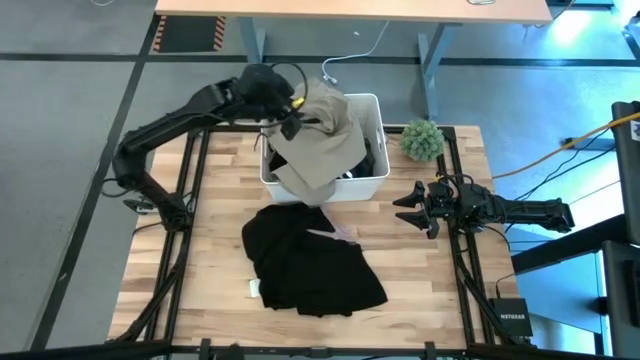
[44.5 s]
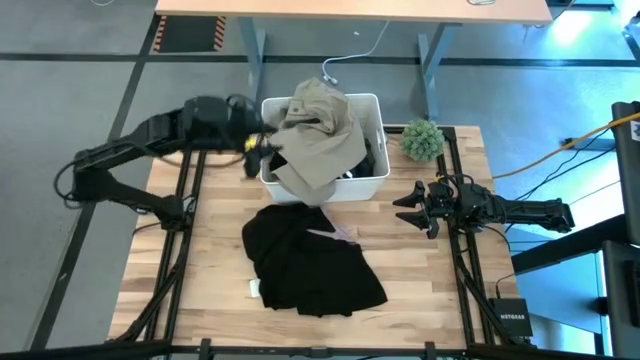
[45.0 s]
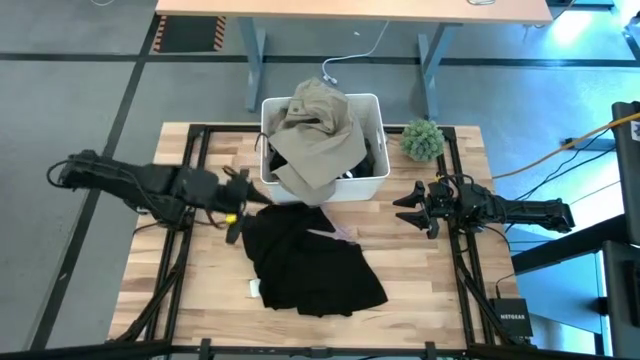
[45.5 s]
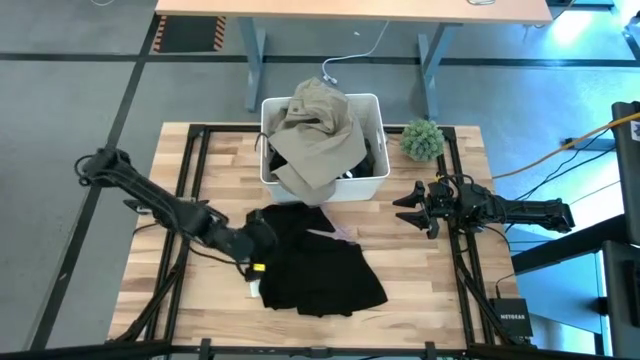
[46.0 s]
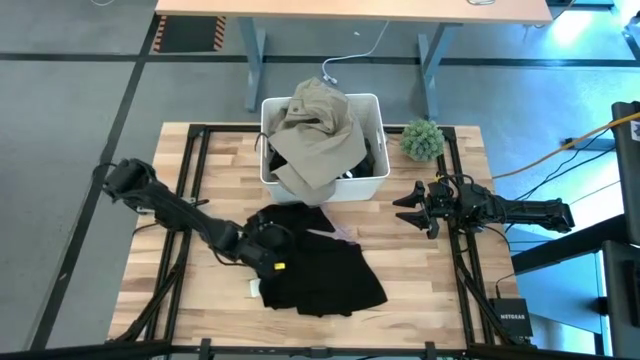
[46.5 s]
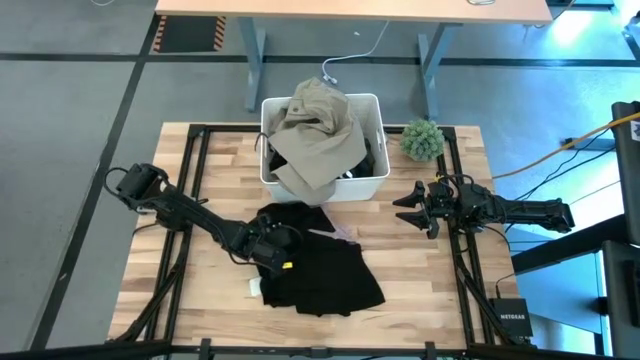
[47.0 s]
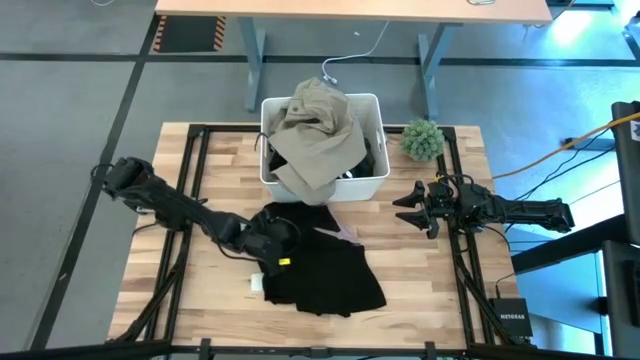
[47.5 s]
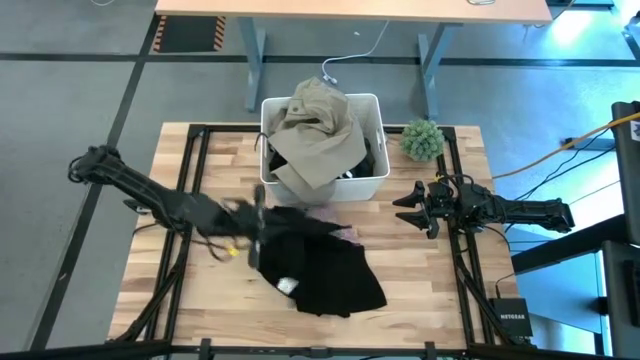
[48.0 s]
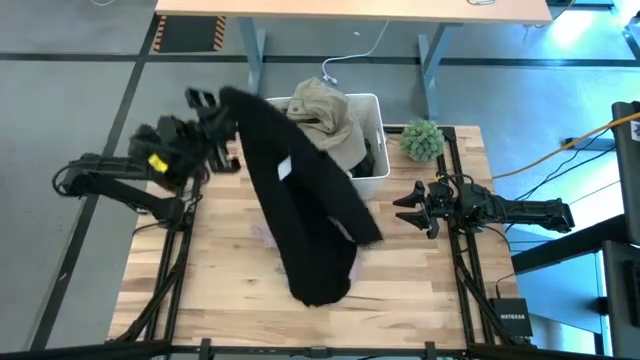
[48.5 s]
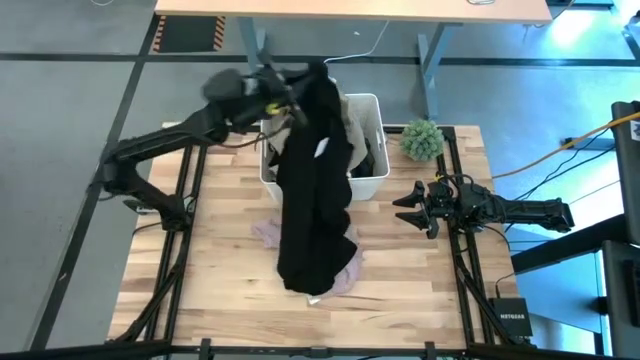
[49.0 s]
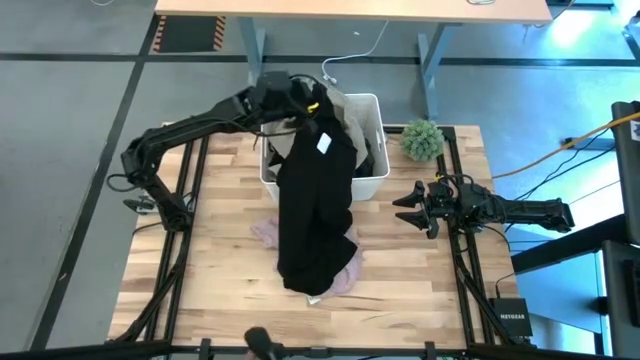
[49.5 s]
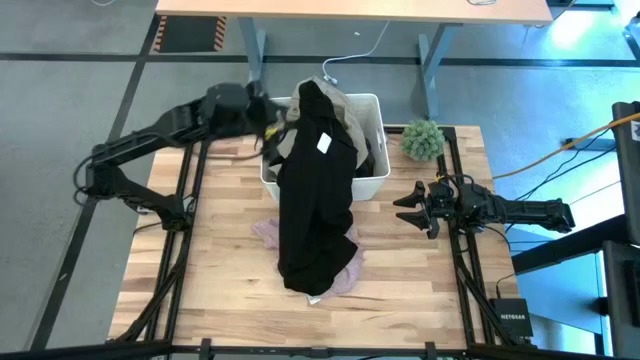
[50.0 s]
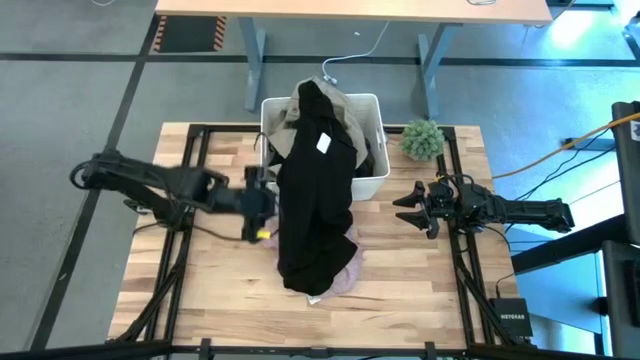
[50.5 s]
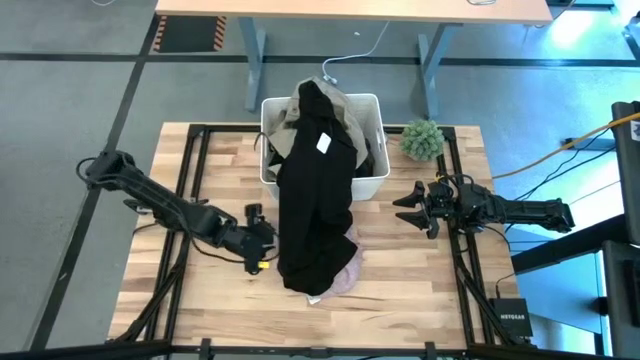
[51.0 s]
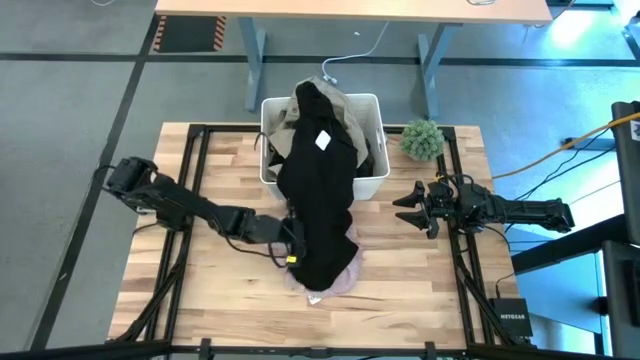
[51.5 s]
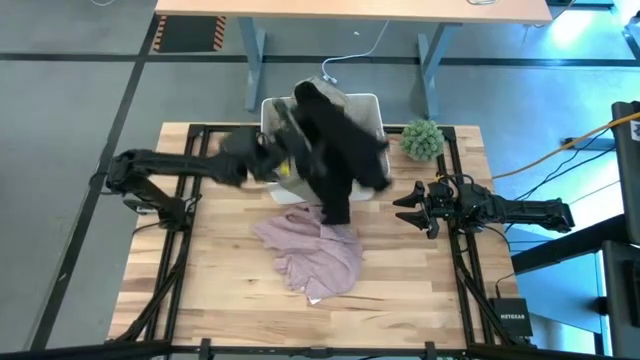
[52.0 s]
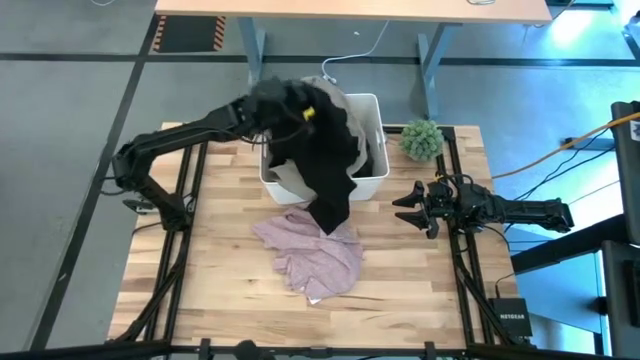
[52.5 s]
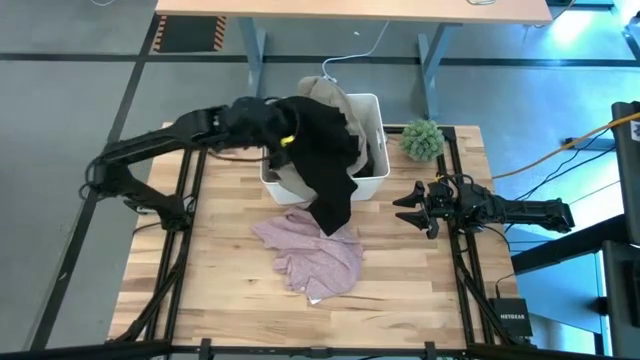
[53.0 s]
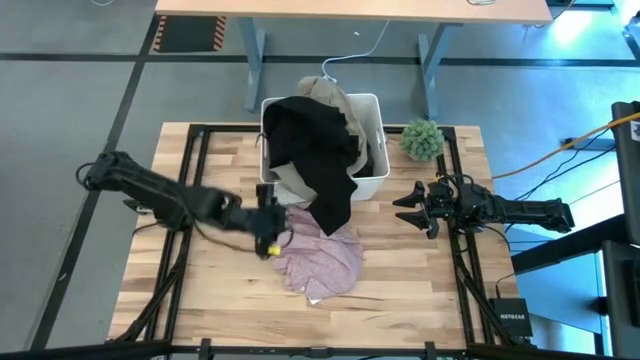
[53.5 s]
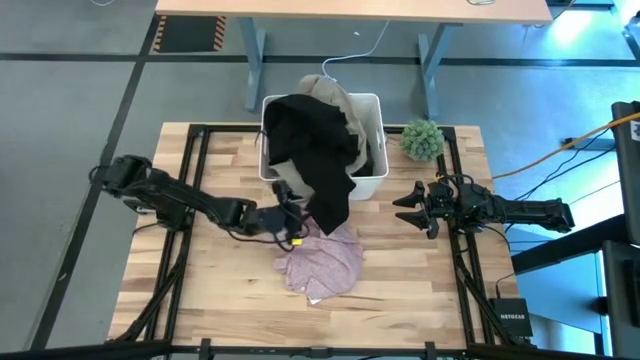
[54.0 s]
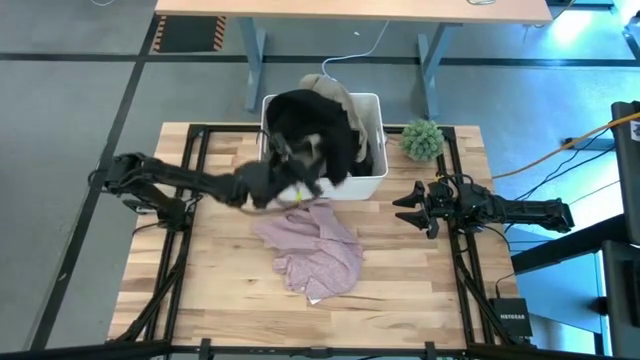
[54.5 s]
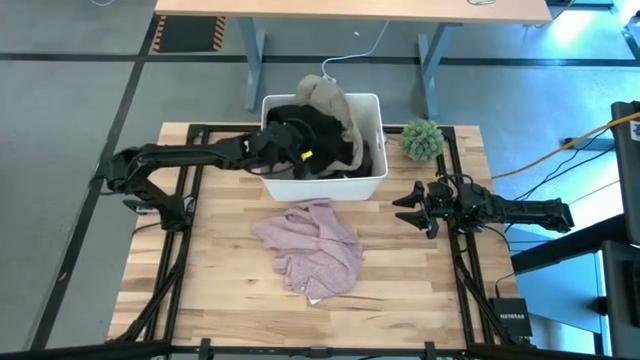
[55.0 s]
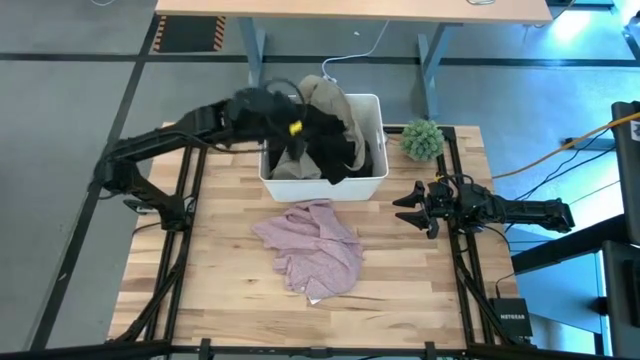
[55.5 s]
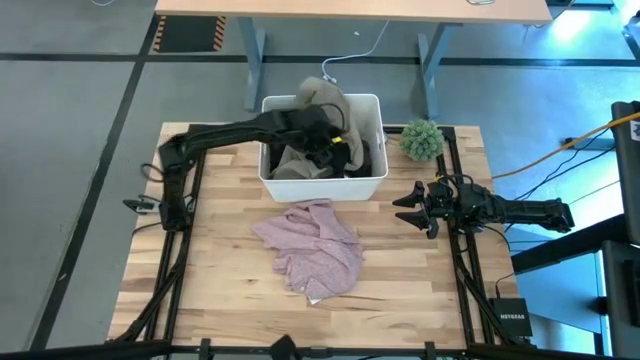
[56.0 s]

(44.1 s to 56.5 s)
Task: Sort clothes
Put the black sweater into the white bin

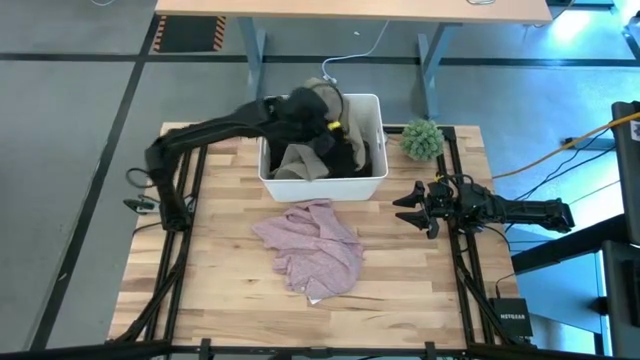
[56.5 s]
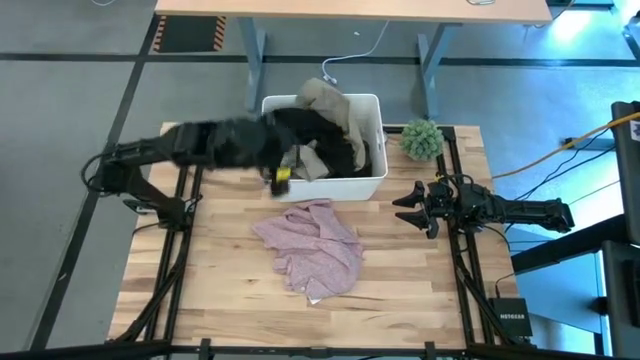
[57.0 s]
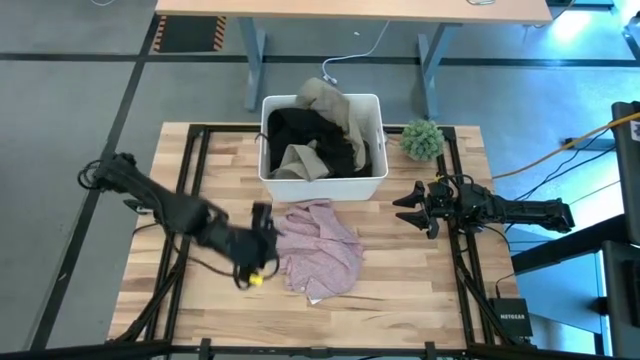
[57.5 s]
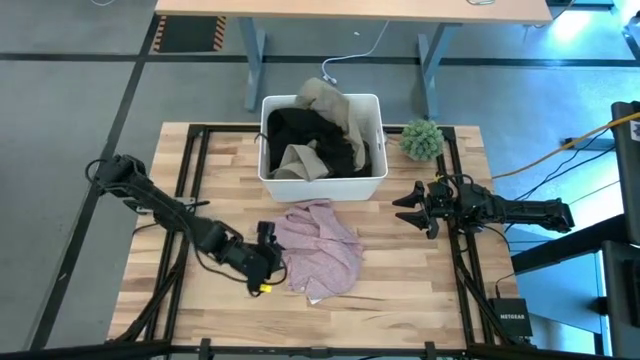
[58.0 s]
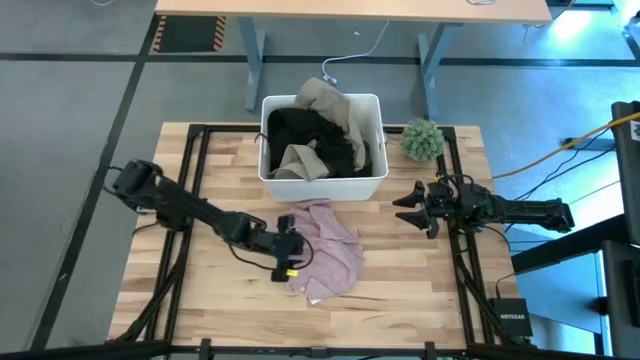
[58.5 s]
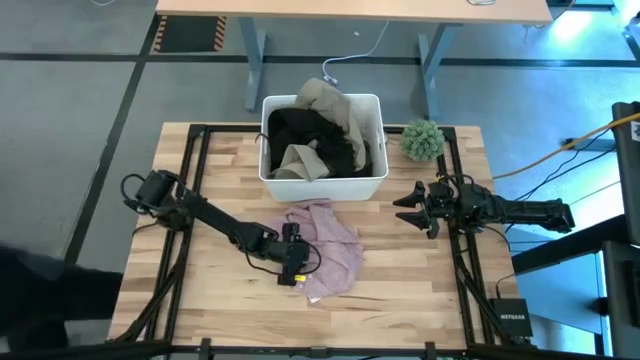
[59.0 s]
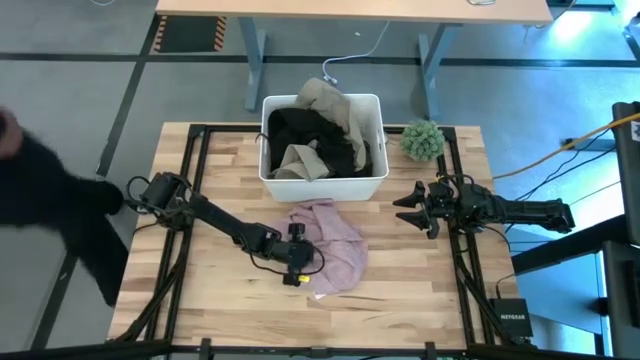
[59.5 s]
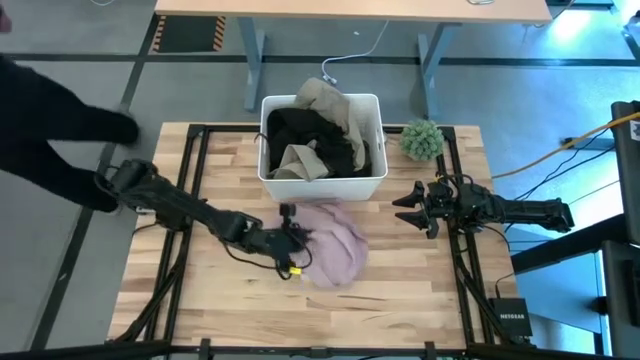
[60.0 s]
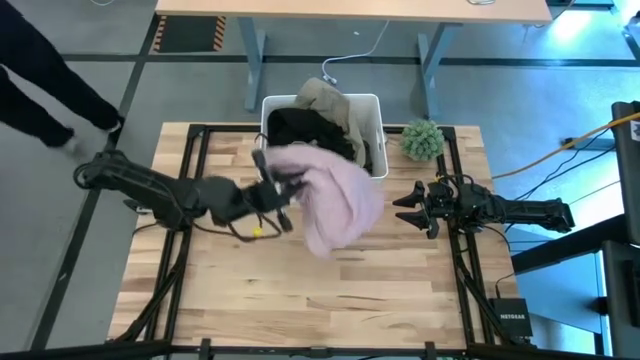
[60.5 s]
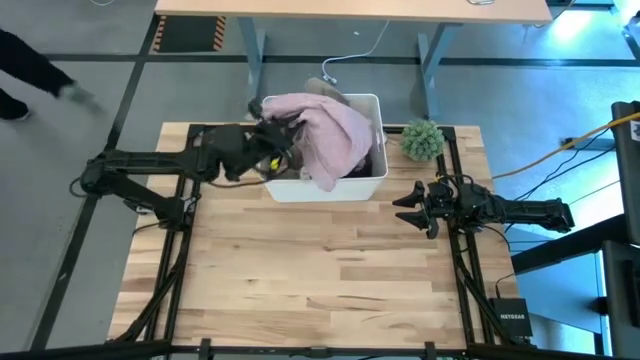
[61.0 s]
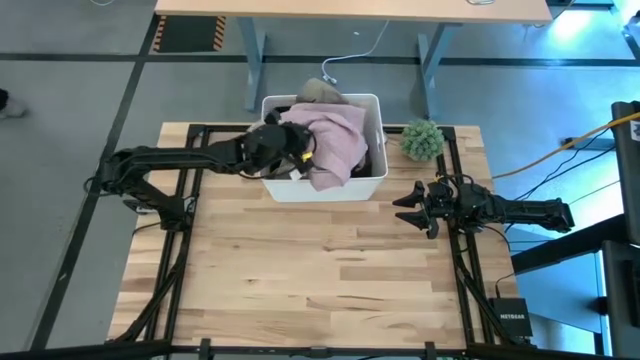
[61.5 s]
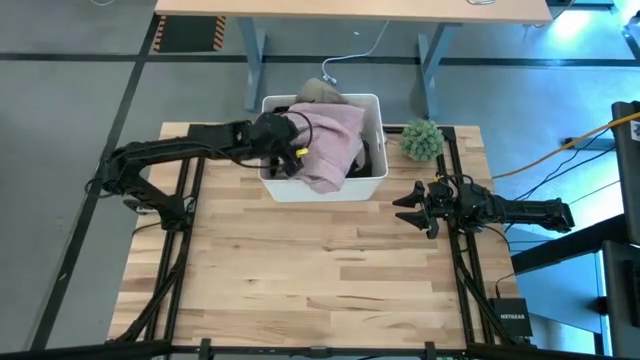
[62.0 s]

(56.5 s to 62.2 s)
Put the pink shirt into the white bin

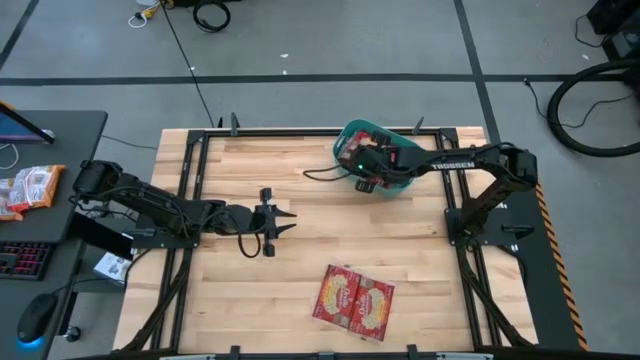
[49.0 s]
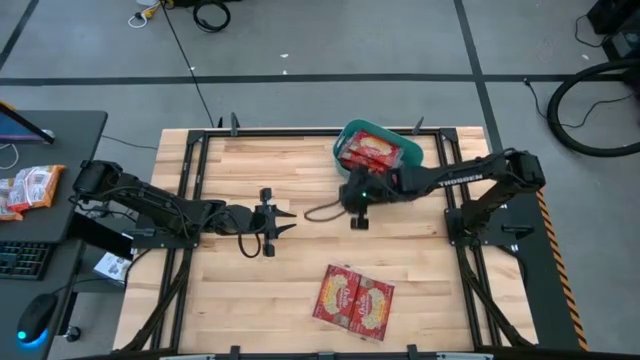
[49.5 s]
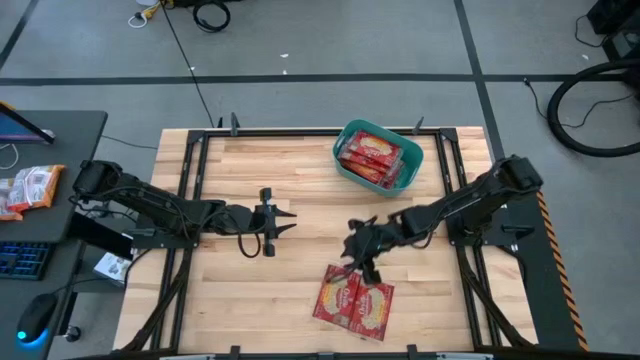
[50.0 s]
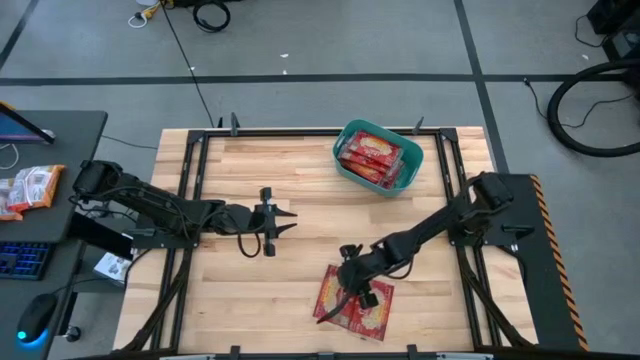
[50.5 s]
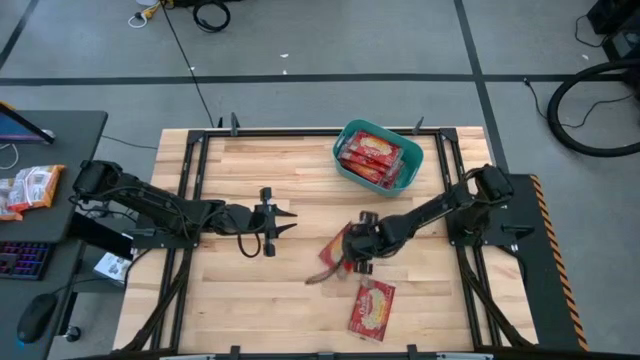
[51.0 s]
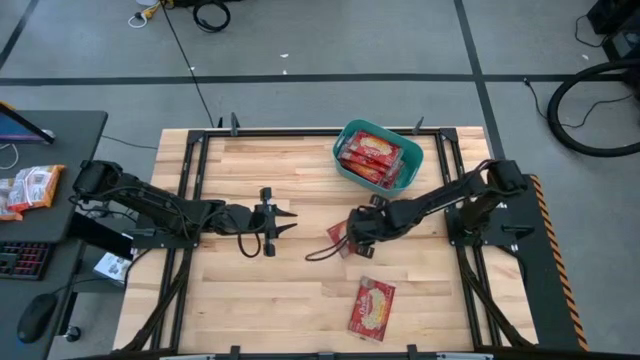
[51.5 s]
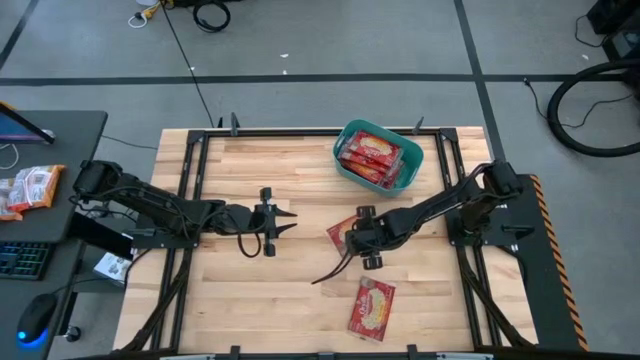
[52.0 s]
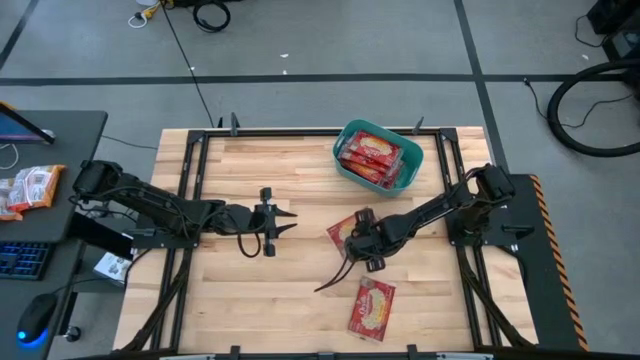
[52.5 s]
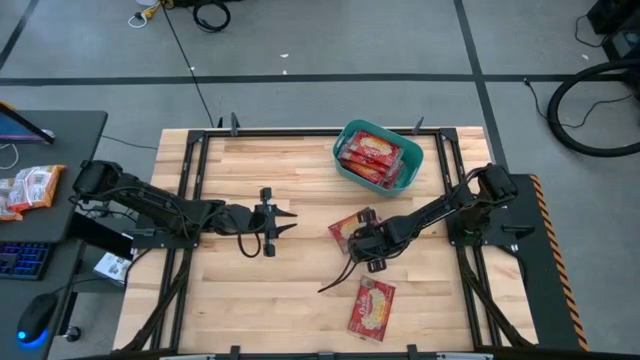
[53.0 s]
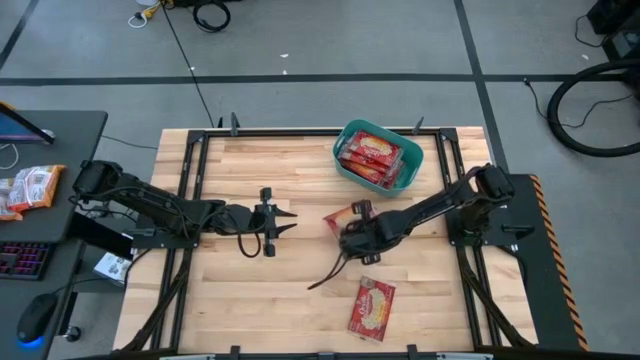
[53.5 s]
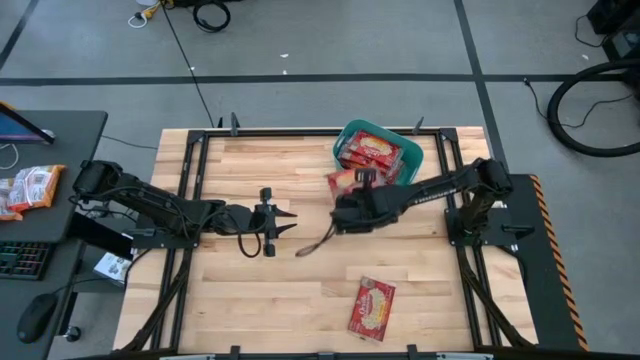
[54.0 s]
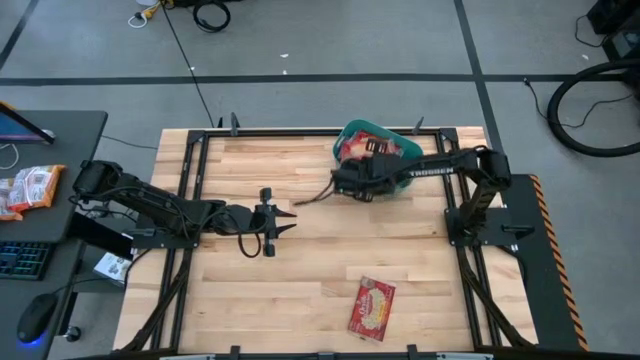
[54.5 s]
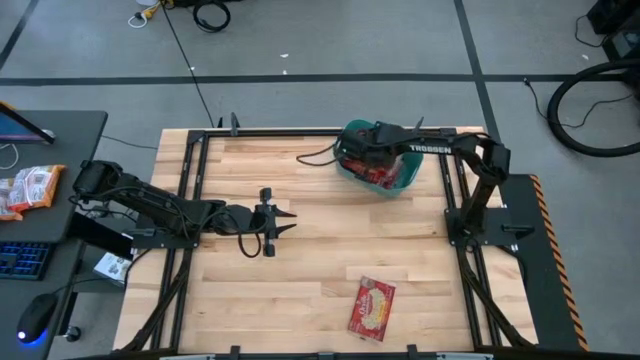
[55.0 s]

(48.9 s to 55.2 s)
Task: Sort popcorn bags into baskets
Put the popcorn bag into the bin
